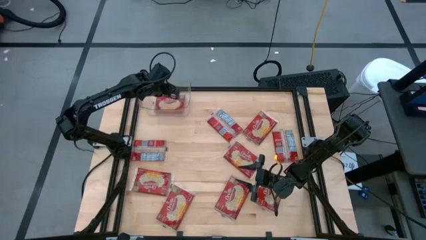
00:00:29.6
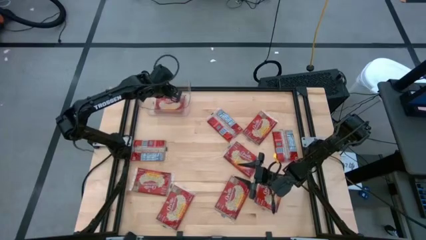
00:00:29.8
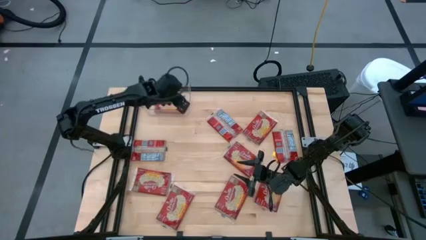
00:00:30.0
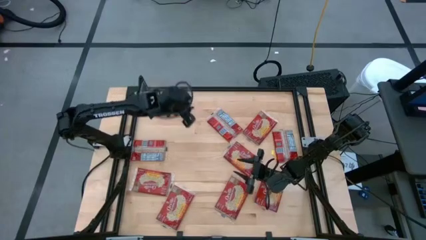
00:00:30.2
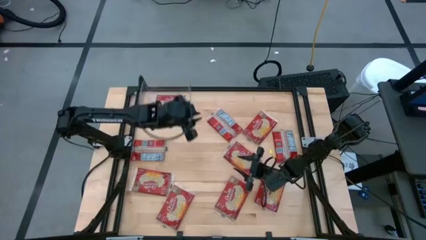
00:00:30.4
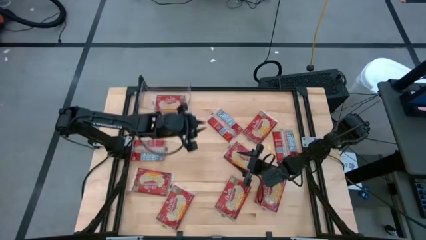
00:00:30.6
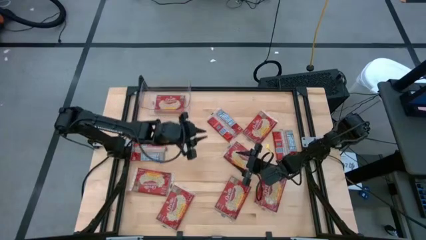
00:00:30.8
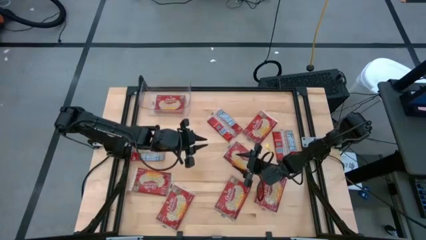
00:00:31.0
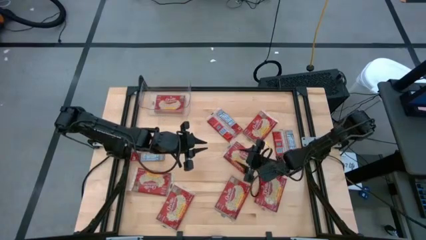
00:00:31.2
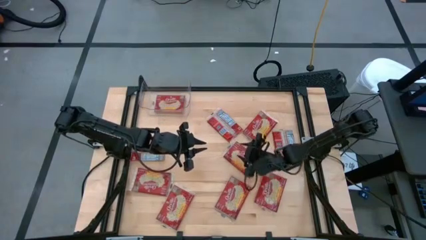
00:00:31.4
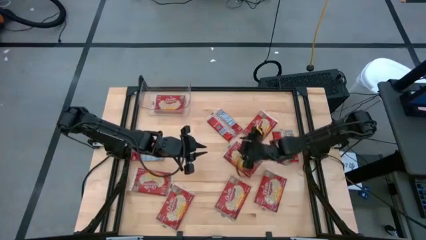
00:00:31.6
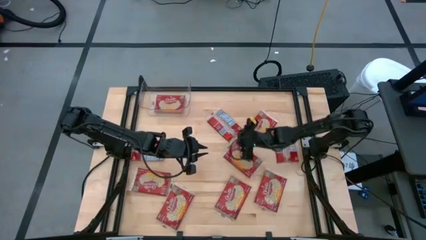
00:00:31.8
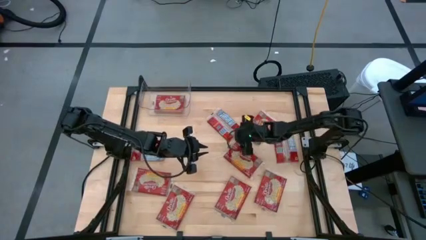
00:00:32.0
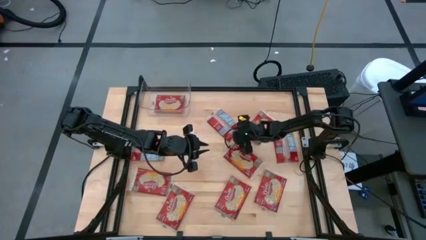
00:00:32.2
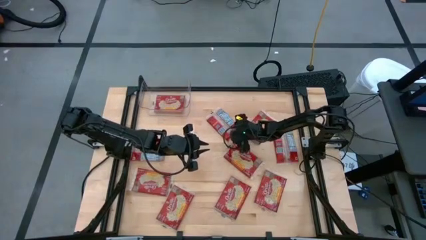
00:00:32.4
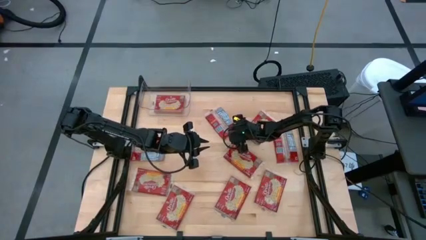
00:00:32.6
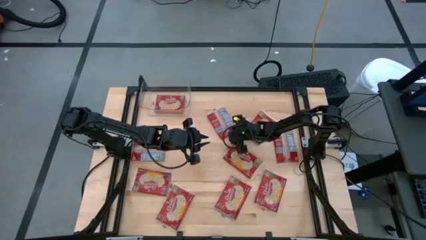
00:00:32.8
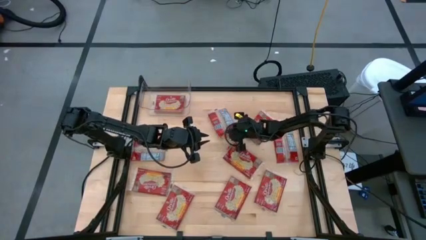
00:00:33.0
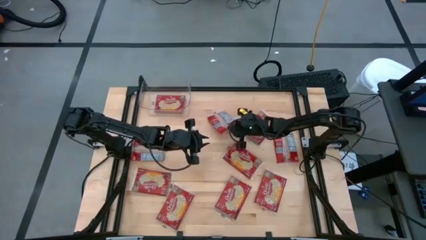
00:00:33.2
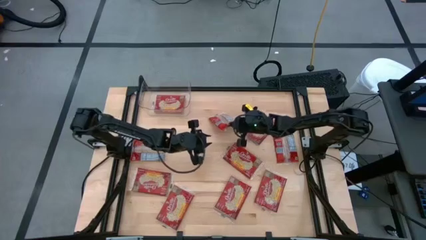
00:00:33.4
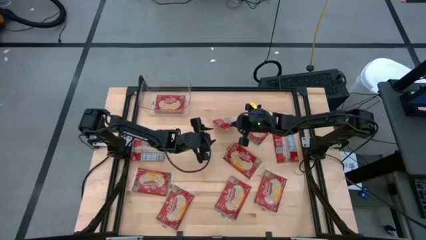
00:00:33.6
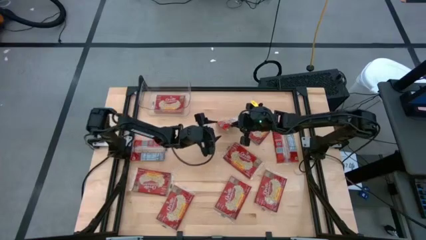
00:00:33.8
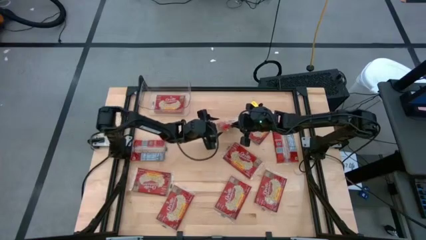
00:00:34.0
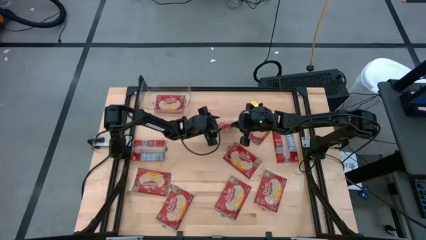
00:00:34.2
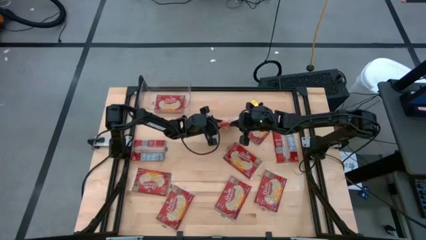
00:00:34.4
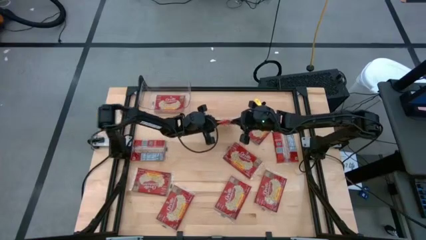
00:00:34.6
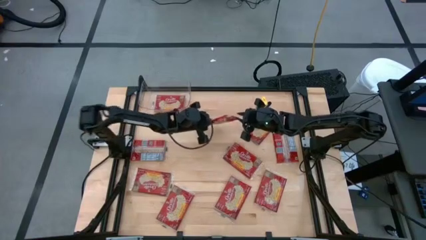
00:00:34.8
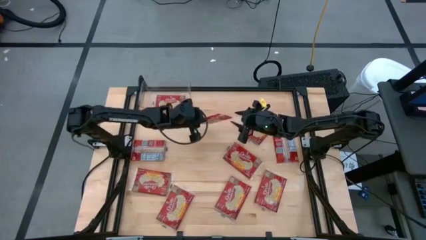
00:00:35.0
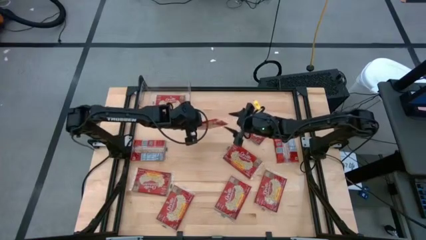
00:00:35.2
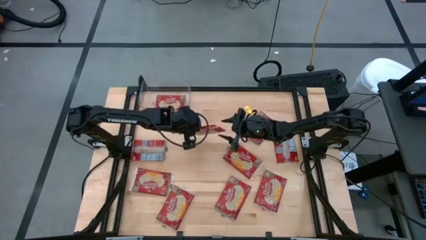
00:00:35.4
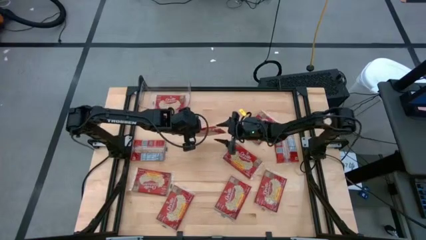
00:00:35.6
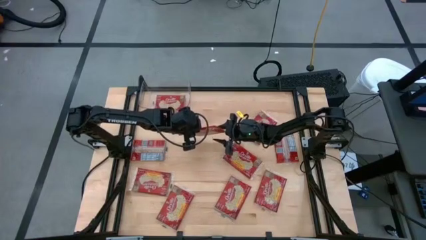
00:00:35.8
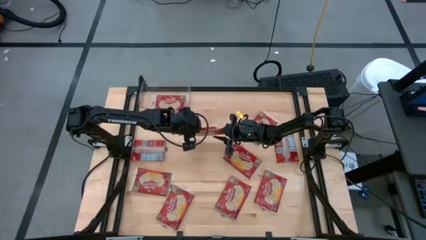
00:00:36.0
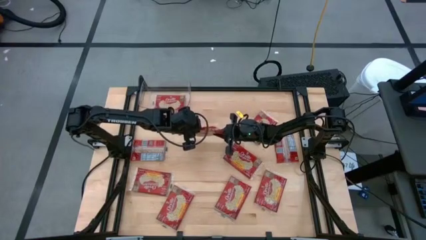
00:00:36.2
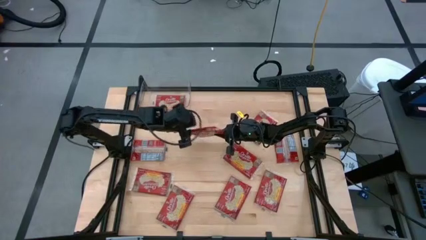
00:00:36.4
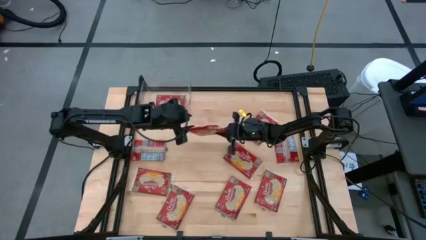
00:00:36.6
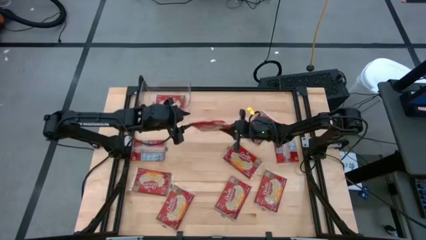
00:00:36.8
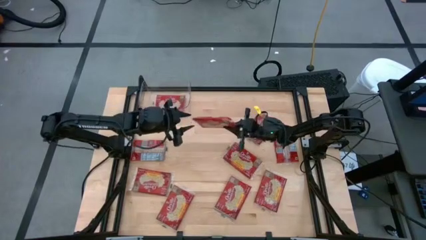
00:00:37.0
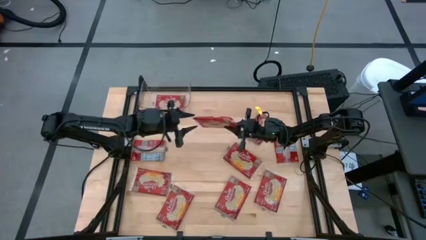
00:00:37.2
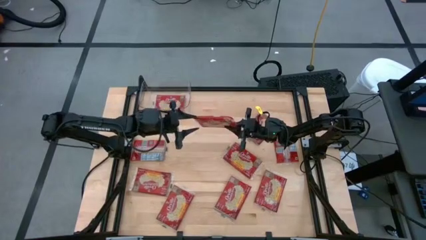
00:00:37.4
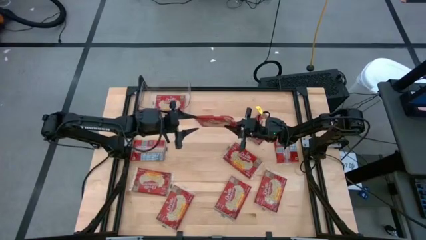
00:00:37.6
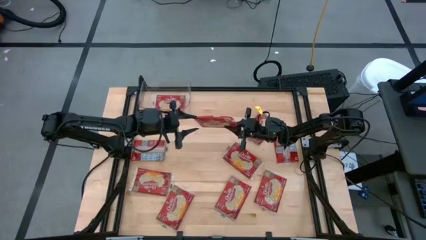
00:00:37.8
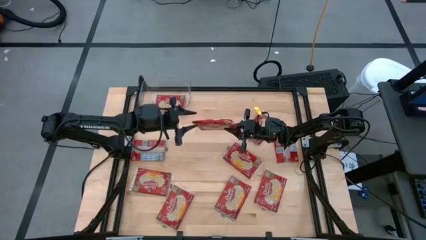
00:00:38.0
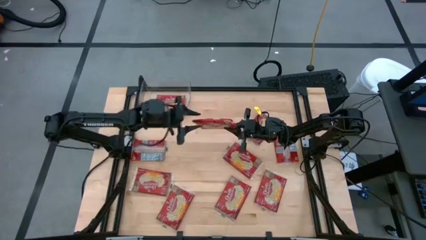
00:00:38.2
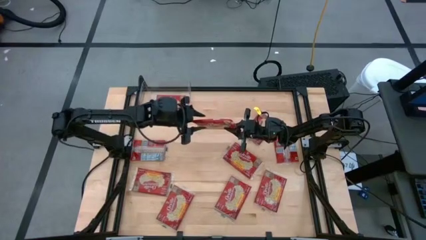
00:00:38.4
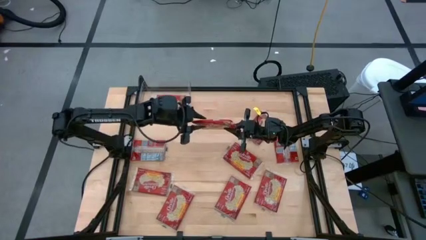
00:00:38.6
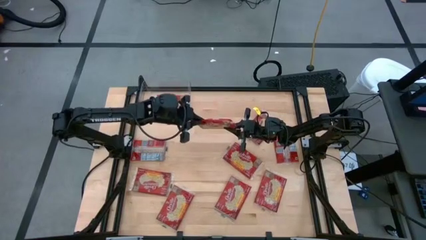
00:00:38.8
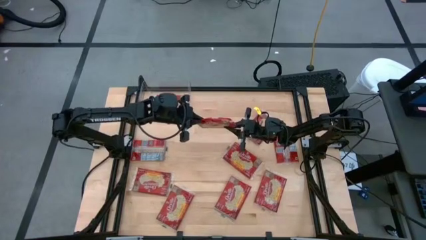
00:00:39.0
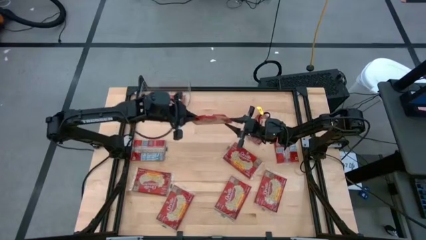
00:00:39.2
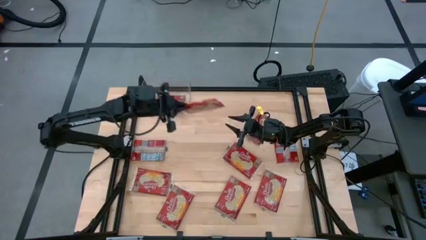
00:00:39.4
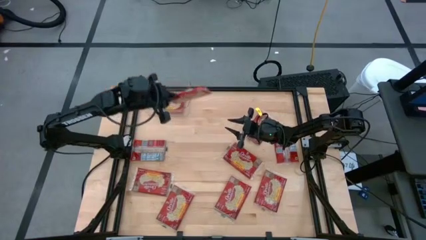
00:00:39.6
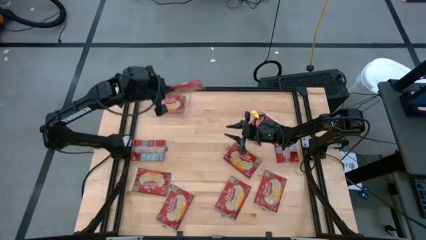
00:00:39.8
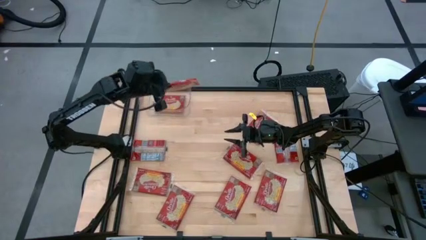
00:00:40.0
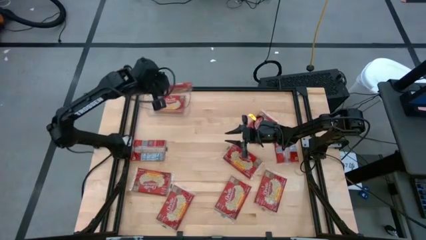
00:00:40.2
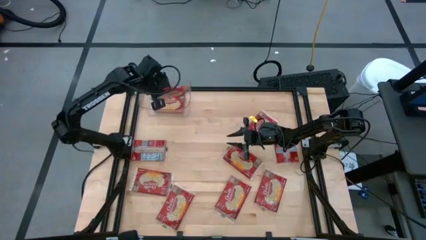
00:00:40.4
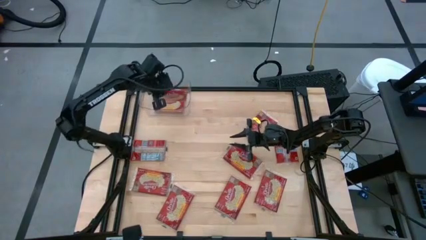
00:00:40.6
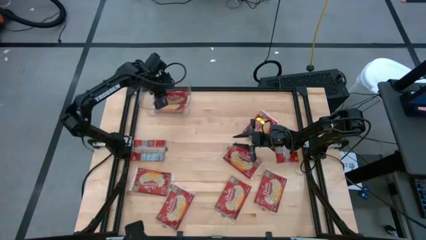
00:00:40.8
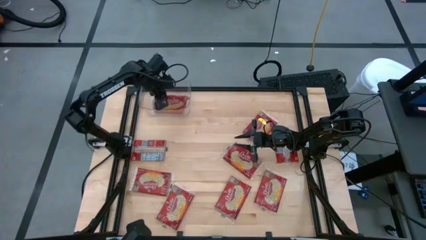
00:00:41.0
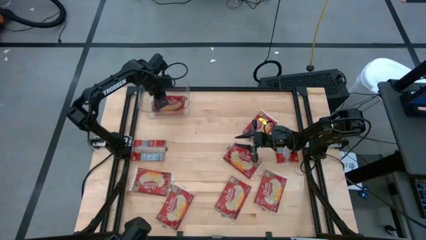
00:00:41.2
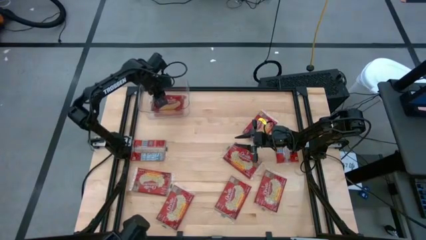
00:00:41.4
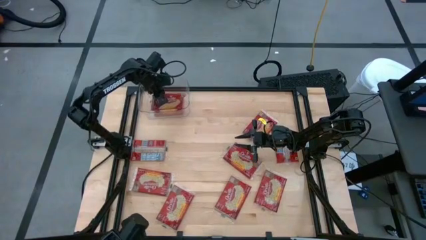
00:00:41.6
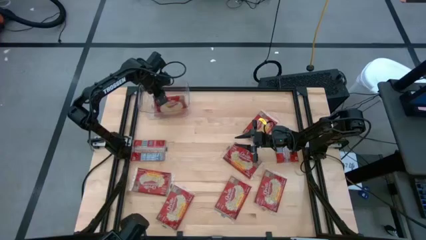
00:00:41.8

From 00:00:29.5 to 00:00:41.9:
Task: Sort popcorn bags into baskets
Put the red popcorn bag into the transparent bin
